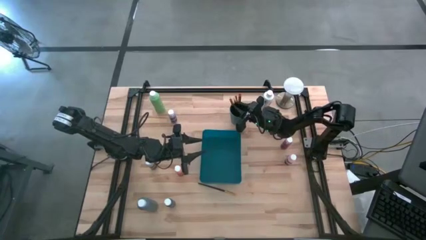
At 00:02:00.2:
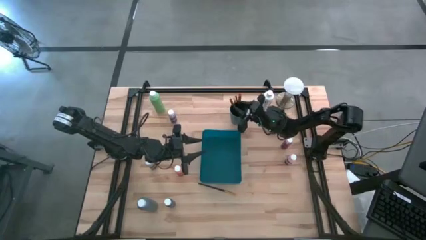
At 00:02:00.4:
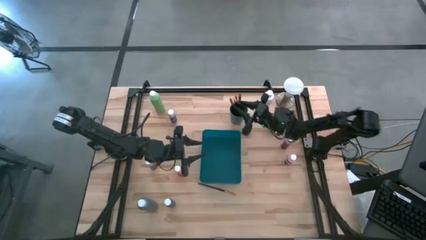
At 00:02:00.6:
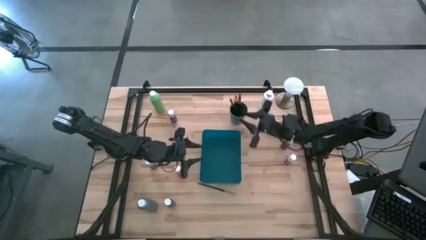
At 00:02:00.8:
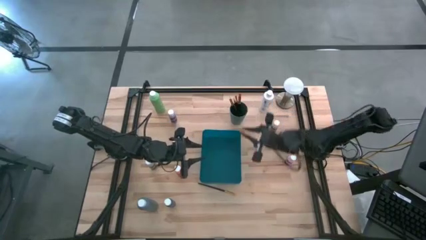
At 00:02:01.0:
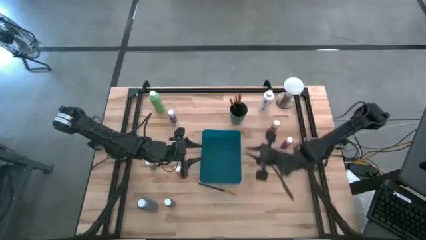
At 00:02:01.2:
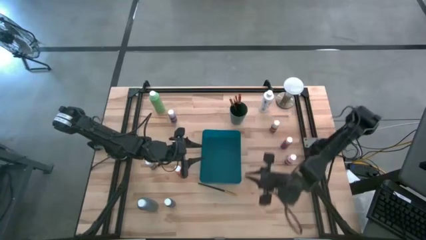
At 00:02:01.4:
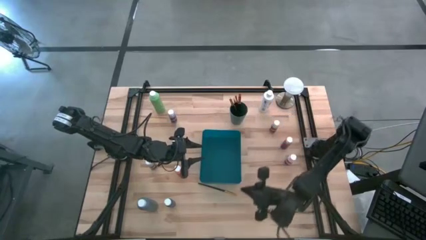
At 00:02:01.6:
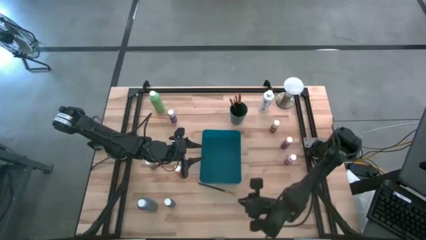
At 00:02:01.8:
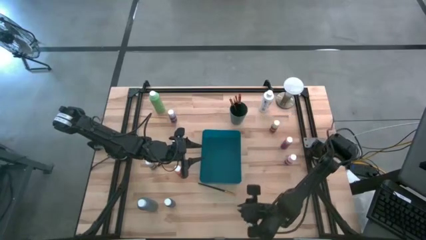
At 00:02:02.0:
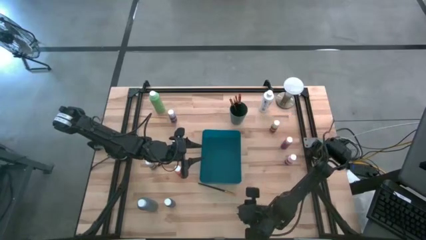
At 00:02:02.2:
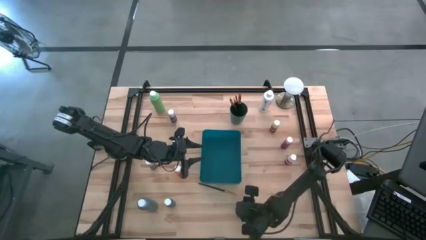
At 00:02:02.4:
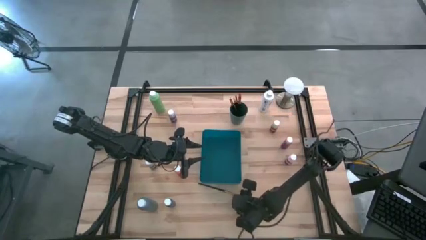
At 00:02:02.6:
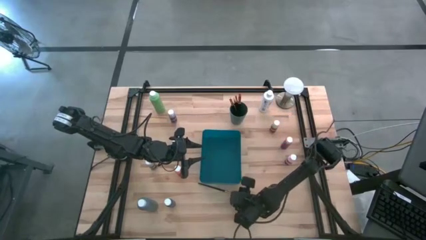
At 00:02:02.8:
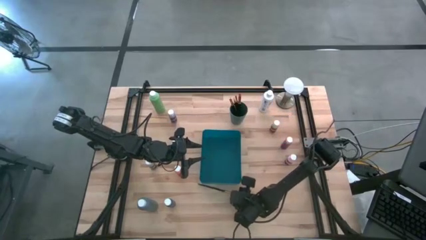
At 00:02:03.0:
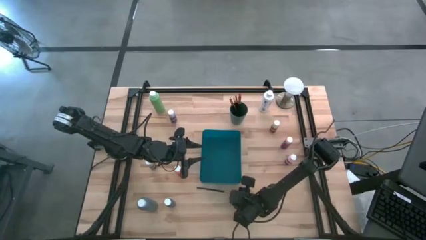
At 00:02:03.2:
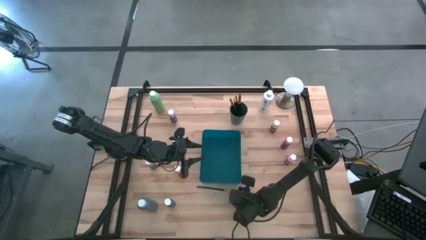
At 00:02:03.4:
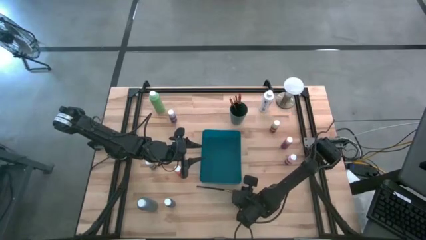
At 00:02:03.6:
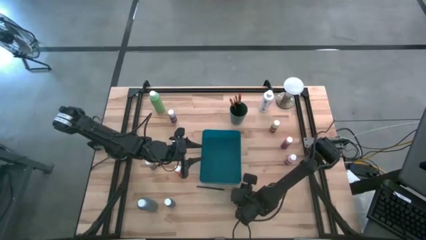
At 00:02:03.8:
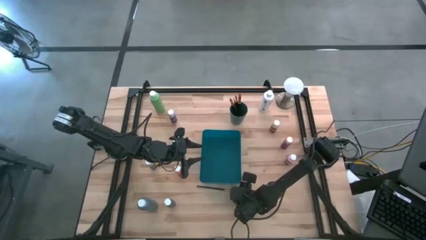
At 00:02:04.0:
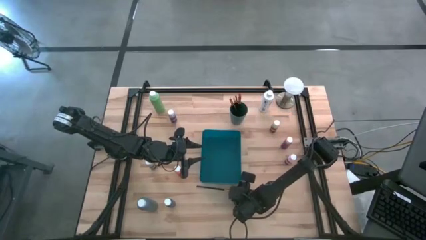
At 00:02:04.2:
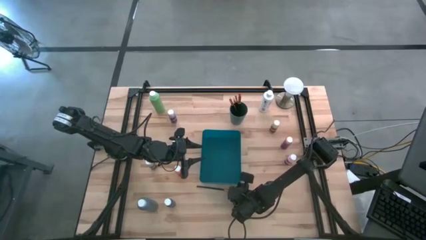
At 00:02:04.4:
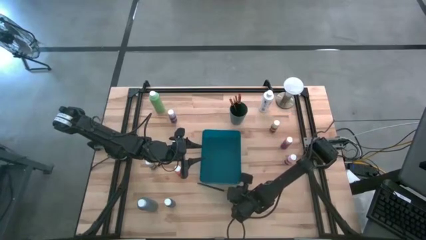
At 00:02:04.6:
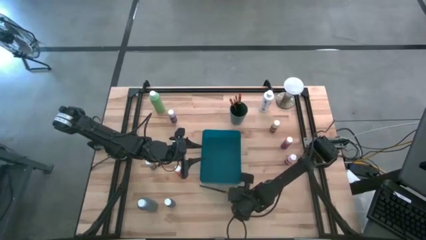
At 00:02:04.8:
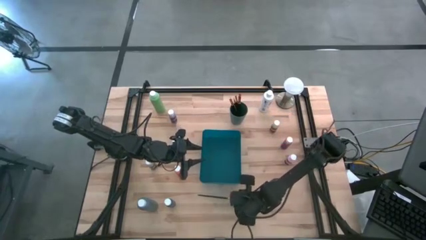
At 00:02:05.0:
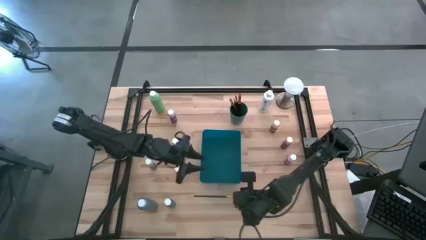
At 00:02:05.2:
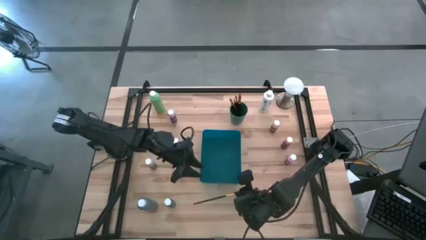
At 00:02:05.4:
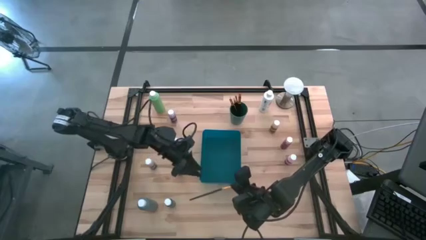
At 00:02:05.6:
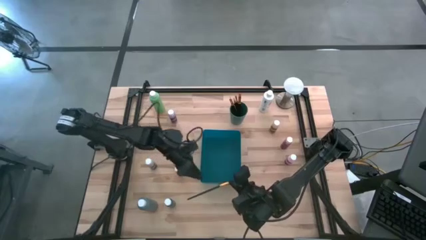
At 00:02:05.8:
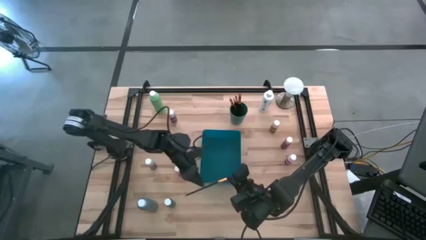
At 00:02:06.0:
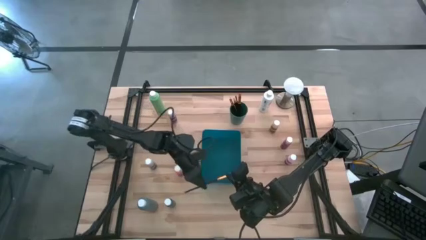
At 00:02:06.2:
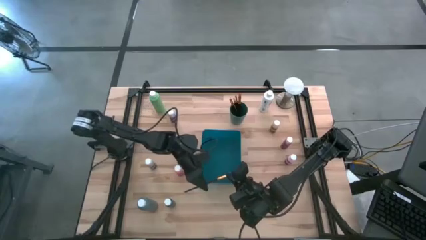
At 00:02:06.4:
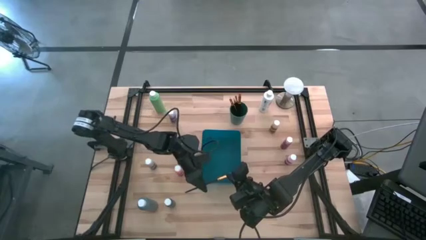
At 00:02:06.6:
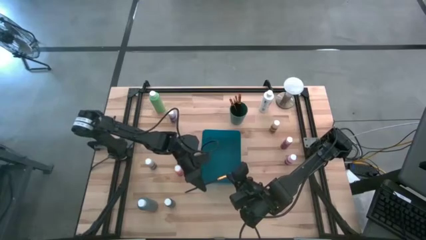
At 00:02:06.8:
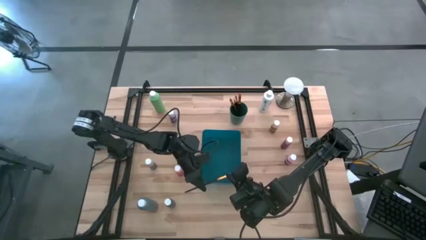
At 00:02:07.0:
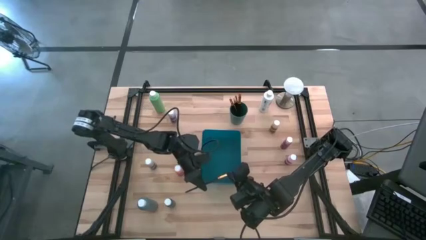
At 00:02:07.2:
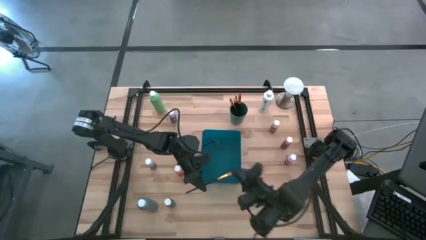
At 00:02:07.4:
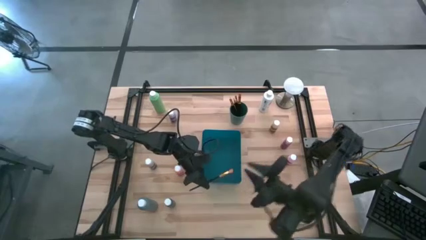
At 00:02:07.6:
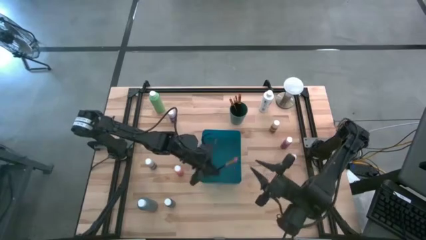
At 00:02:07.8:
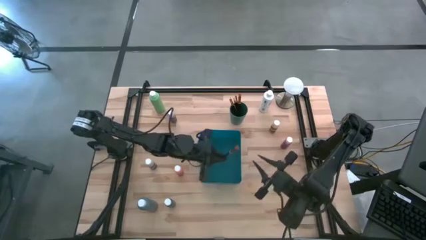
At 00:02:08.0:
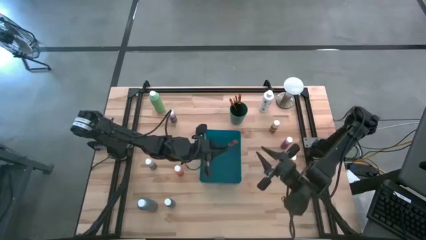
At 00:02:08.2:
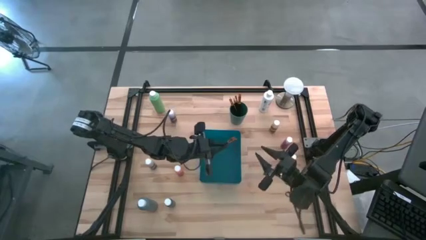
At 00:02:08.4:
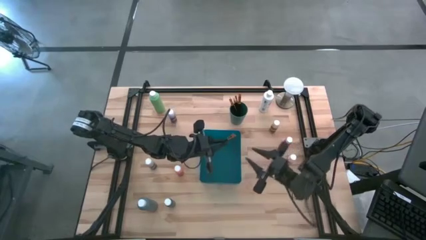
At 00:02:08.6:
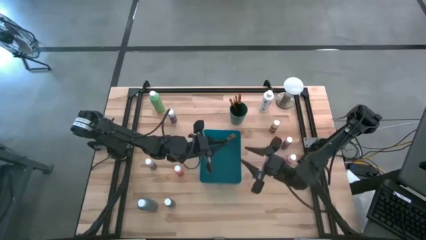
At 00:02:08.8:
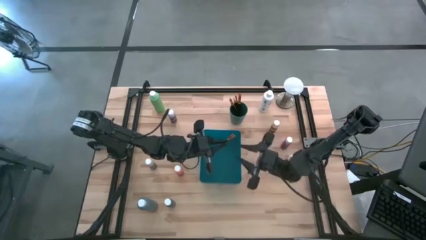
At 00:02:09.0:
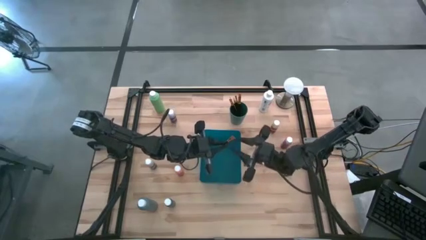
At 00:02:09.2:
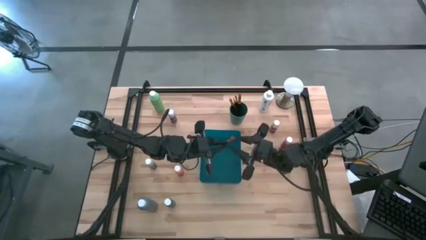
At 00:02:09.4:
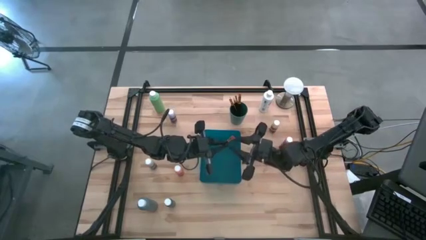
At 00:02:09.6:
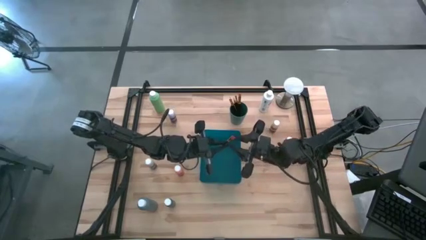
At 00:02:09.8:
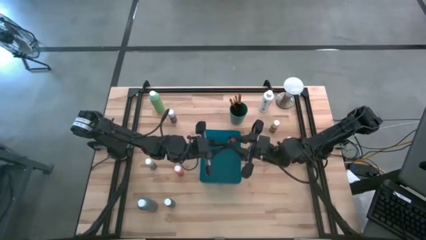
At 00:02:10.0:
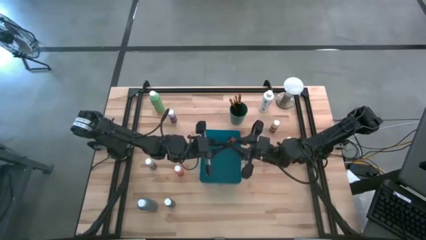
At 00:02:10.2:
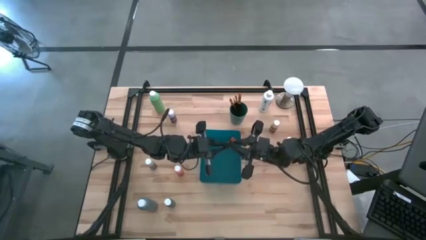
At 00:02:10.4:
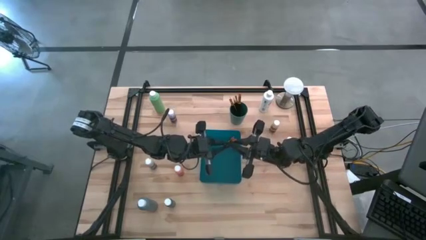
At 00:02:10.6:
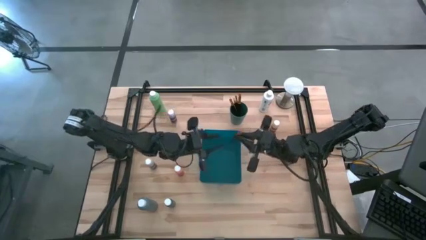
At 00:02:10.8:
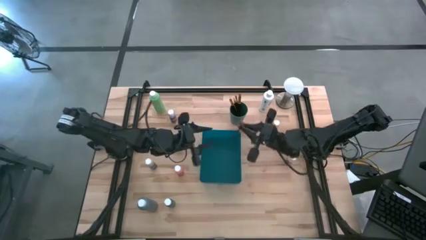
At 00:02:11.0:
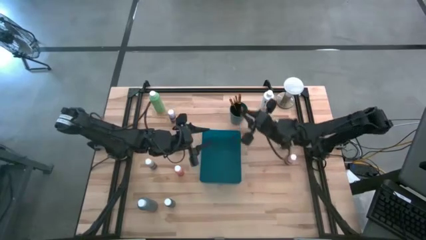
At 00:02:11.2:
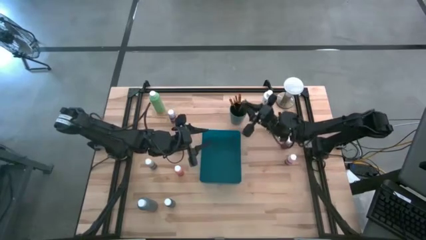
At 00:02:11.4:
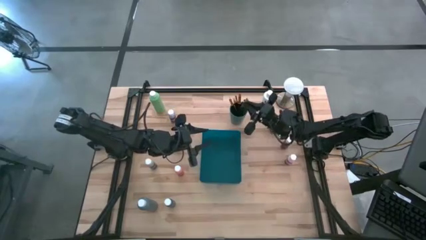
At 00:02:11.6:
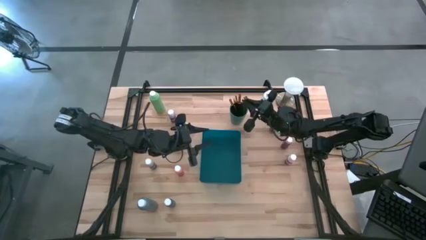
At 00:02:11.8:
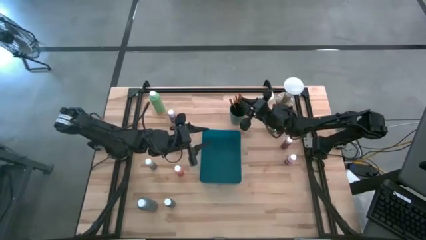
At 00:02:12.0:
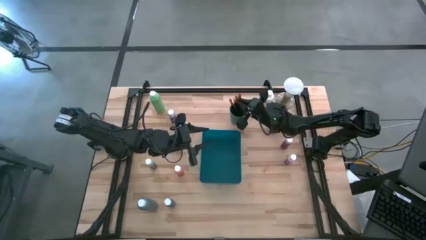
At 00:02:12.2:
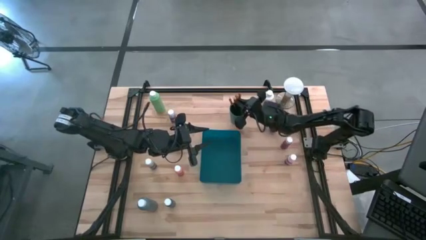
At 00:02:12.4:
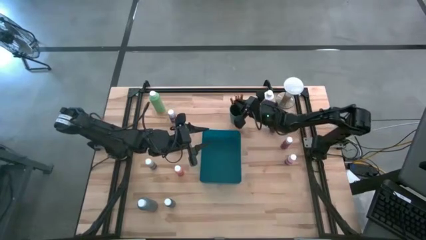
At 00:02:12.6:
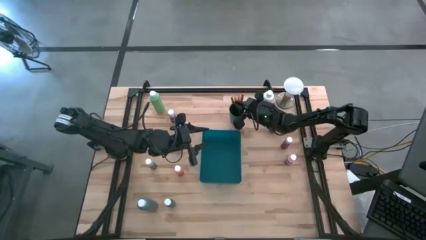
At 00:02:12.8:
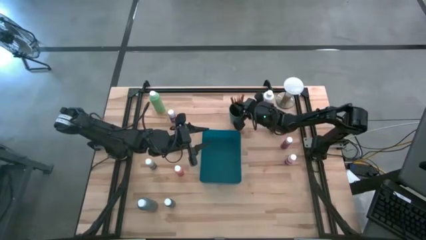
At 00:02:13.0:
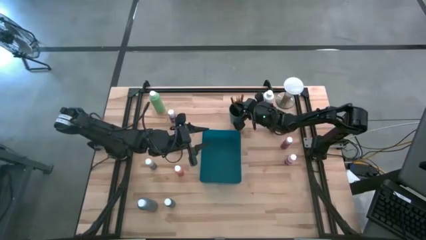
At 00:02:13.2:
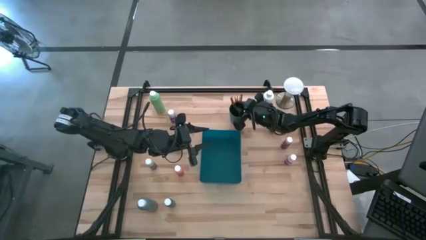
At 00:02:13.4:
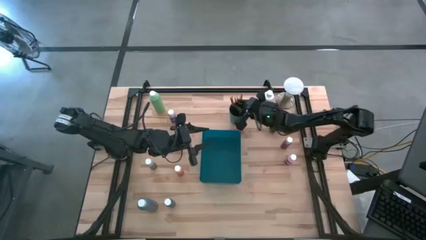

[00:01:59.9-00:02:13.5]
Task: Pick & Place Paint Supplies
Put the gold paint brush into the green cup

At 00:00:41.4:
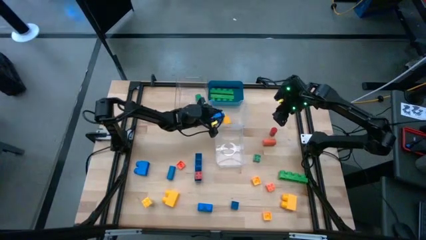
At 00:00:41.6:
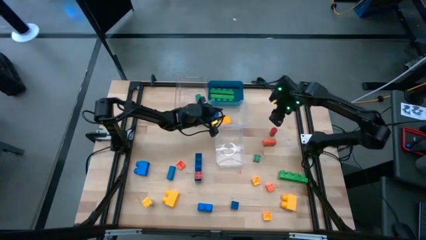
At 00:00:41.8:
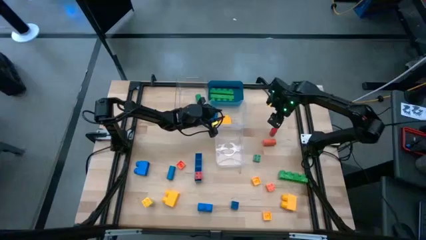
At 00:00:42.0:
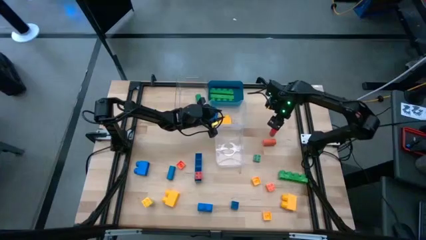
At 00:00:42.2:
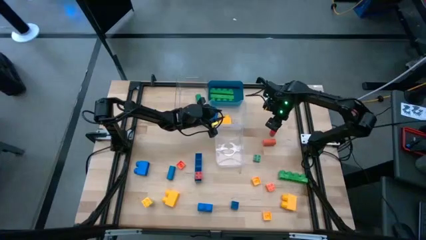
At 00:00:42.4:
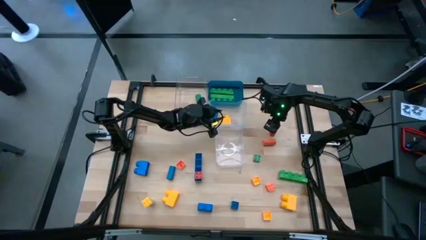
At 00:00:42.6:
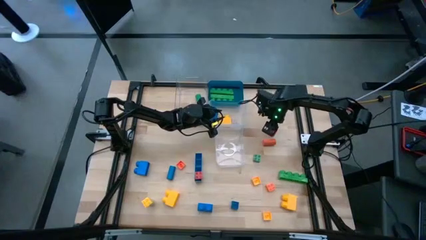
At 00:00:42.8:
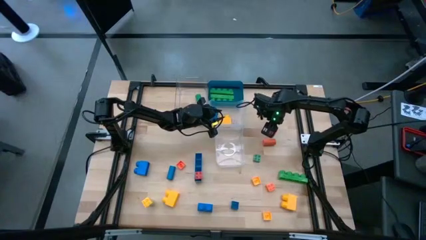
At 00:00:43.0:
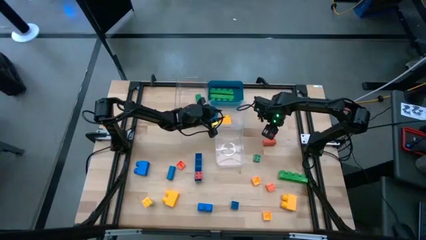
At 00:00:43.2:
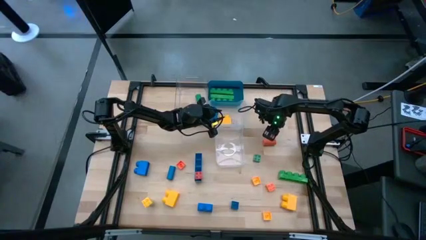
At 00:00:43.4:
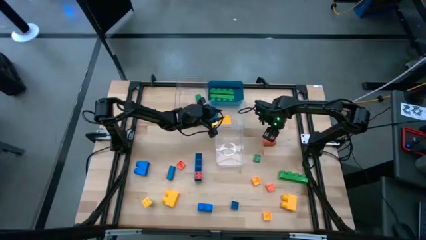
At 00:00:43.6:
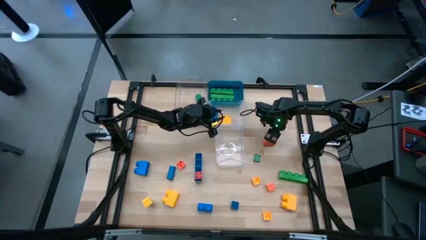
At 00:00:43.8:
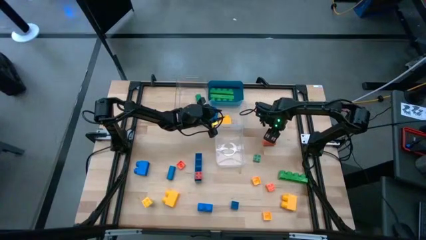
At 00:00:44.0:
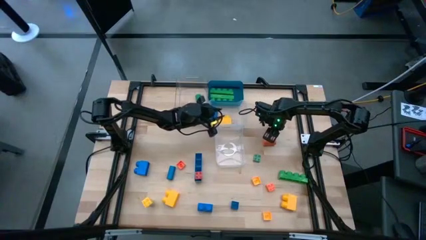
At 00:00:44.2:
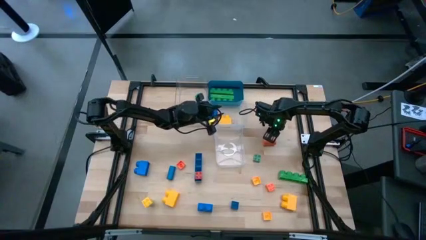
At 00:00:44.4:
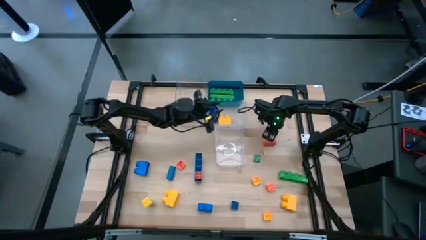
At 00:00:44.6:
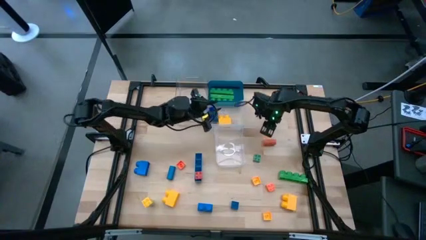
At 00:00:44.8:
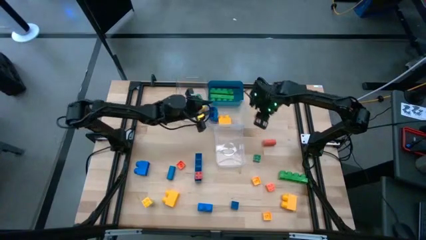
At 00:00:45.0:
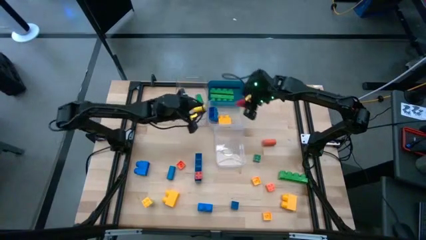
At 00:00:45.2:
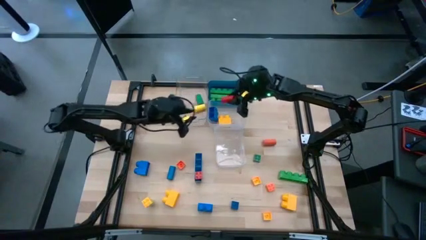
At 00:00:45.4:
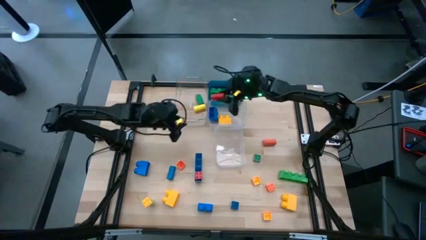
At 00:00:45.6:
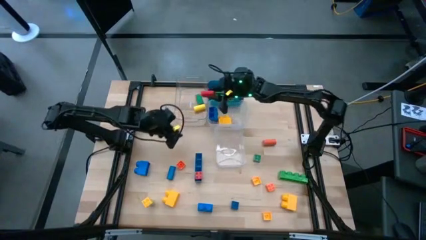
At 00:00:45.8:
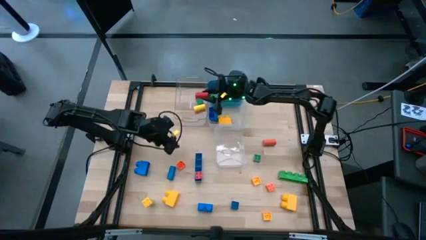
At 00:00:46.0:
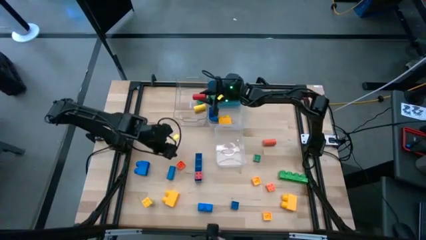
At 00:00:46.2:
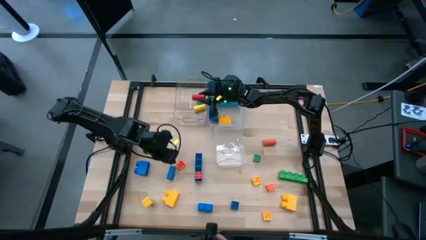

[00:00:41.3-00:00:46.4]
Task: Sort blocks by size
Put the red cylindrical block into the top left transparent bin
